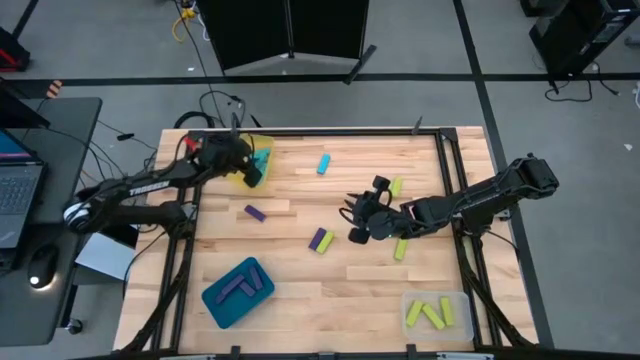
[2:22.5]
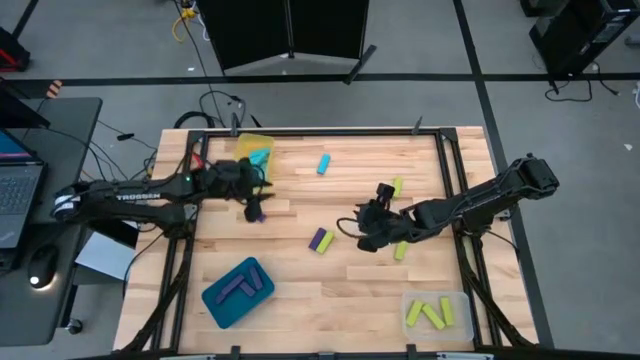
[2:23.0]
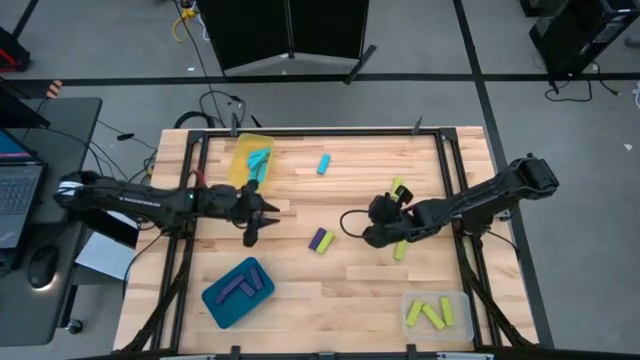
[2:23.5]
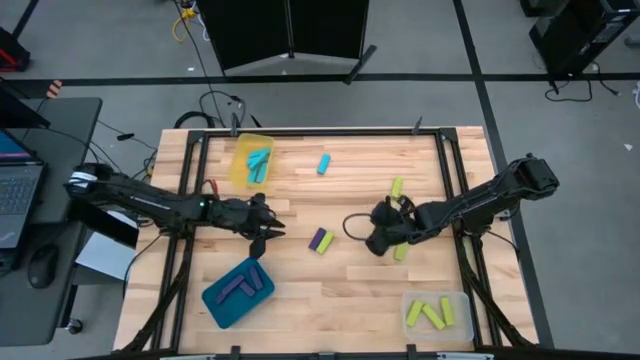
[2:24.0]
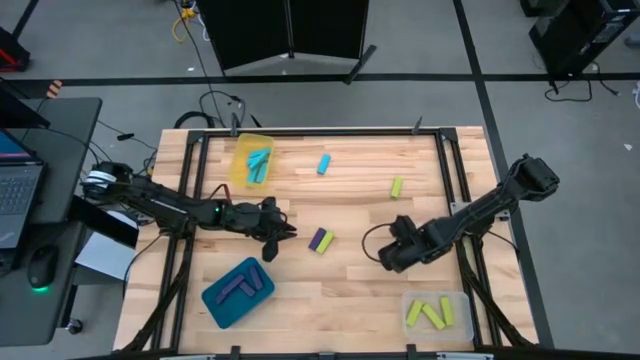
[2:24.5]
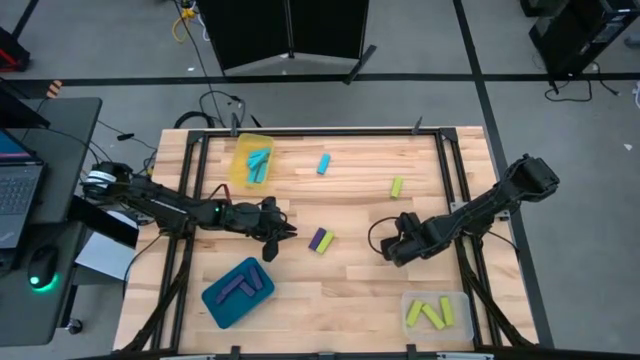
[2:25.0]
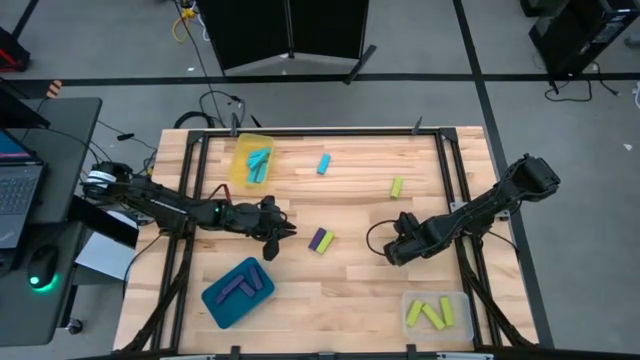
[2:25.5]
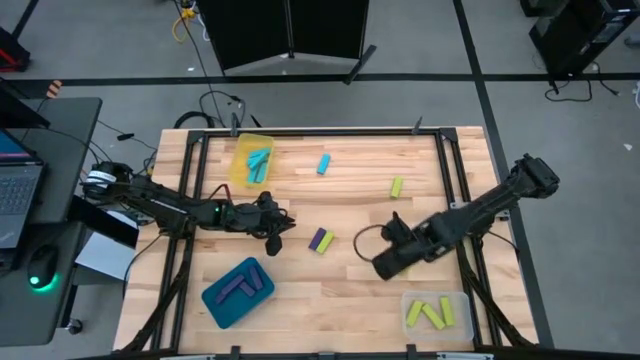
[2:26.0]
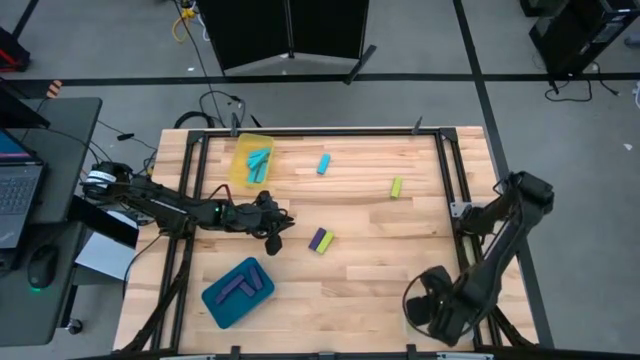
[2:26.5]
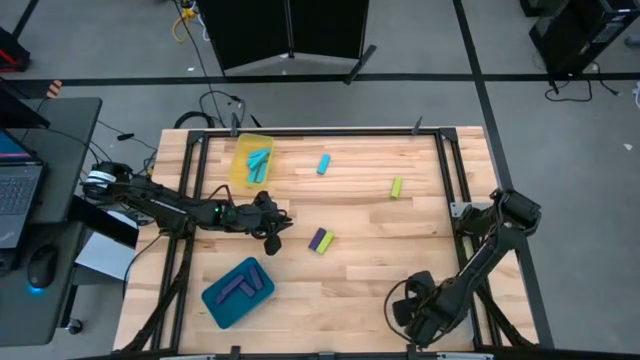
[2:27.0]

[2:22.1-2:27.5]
Task: Sort blocks
Put the bottom right green block into the transparent bin

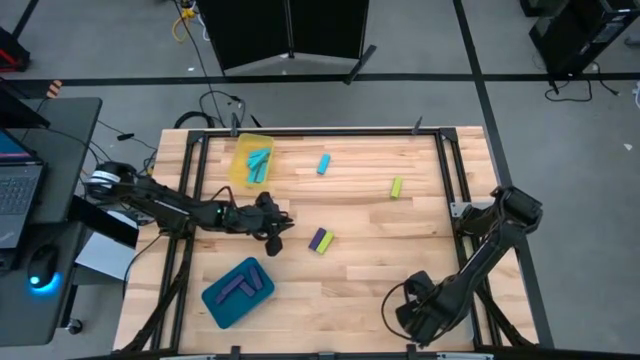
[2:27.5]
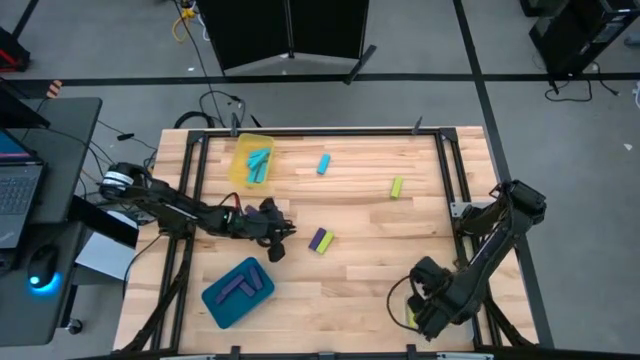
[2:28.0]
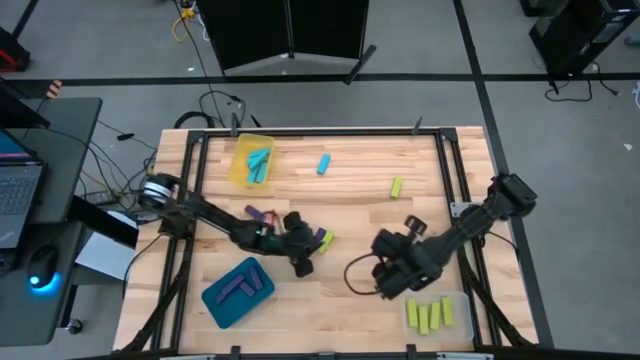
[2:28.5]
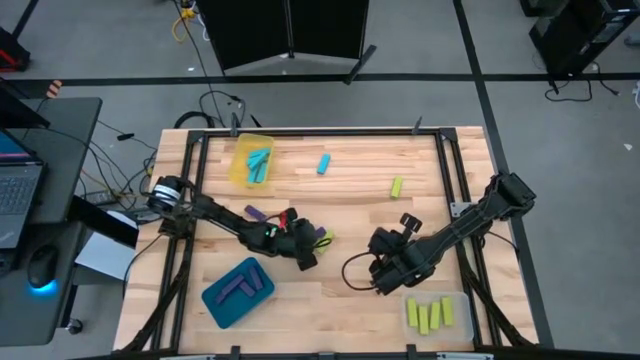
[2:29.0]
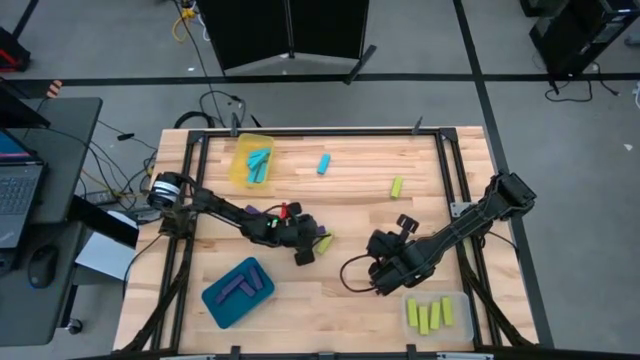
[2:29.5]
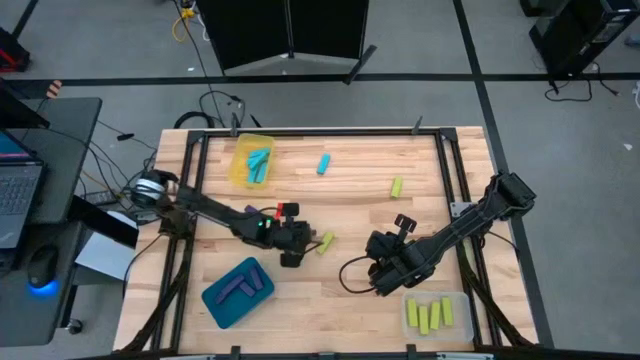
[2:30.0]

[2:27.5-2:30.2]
Put the right purple block into the blue bin

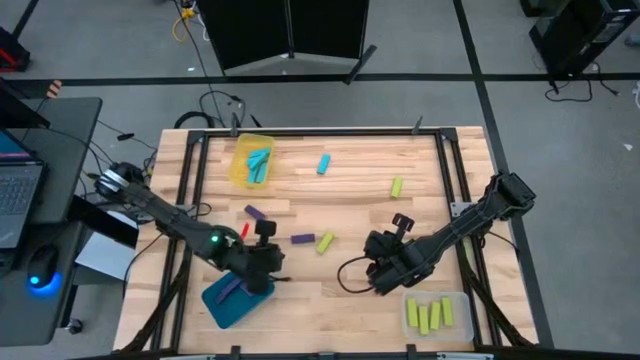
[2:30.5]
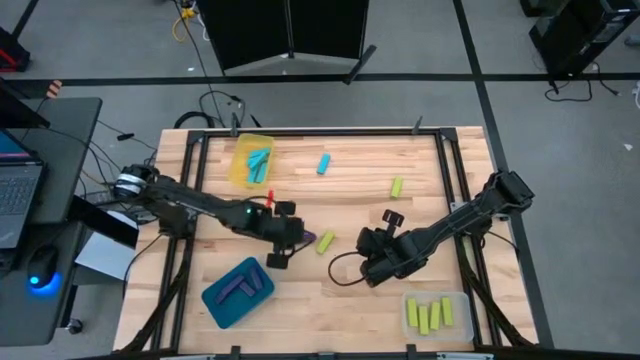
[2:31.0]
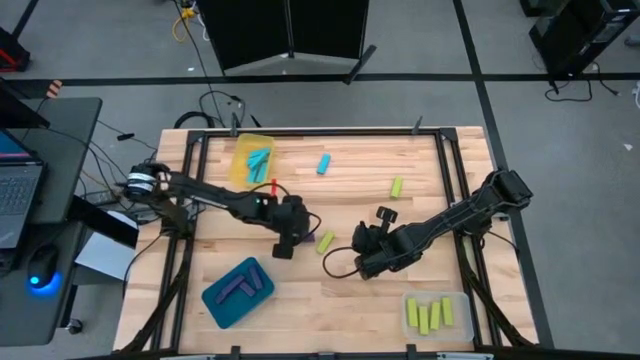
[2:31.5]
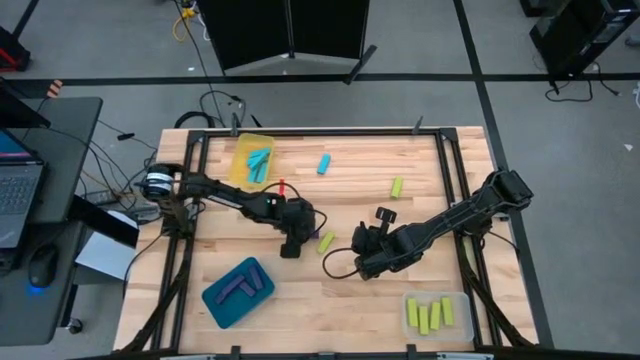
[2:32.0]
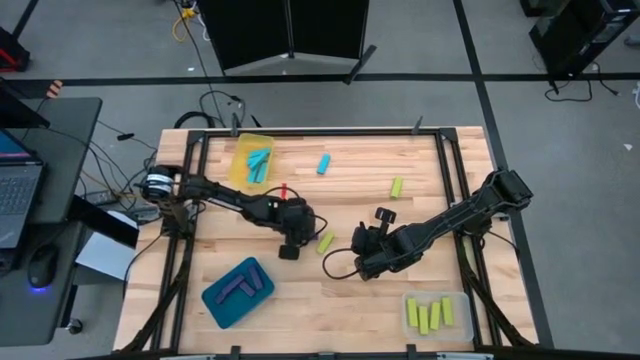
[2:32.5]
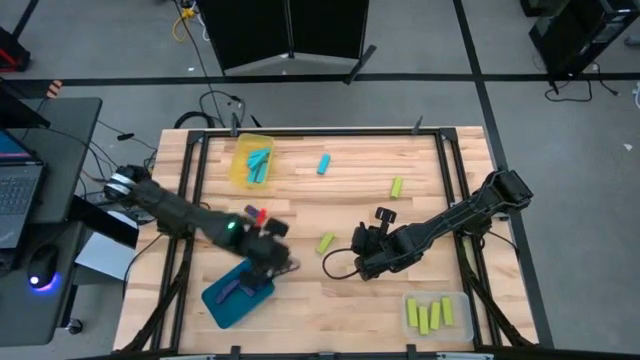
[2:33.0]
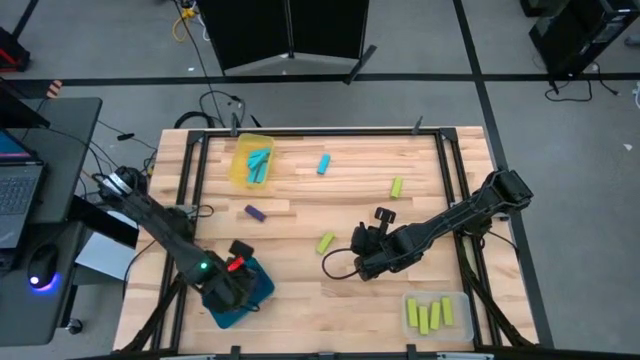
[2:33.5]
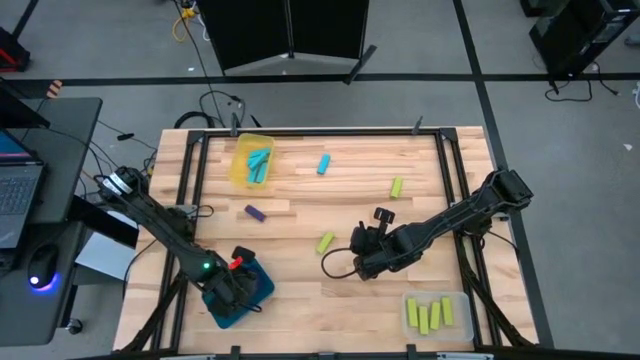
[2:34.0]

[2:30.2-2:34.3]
Put the right purple block into the blue bin

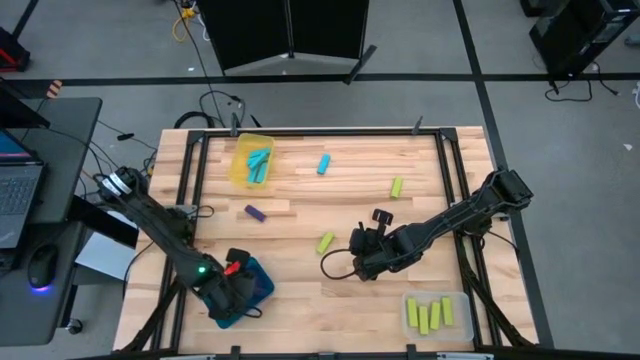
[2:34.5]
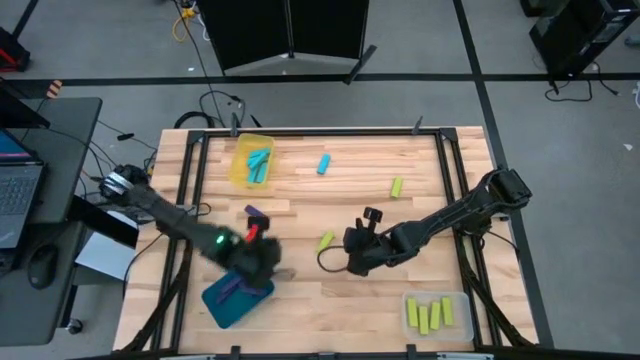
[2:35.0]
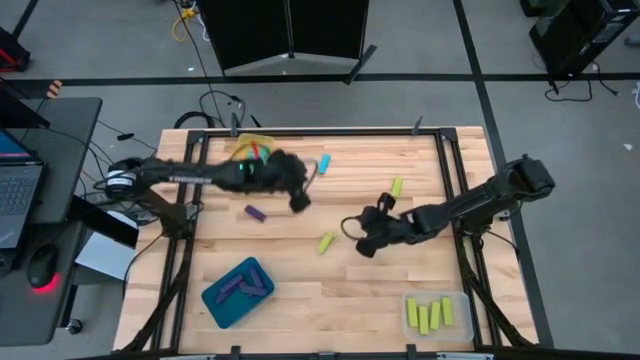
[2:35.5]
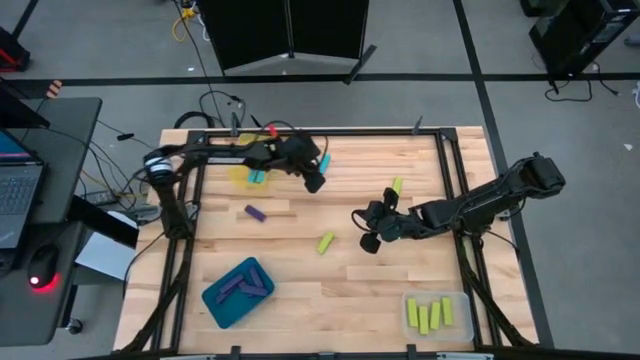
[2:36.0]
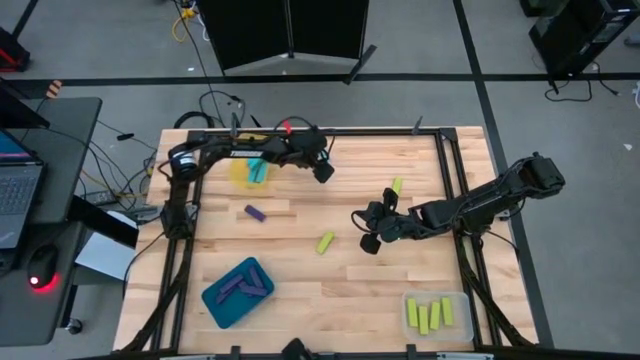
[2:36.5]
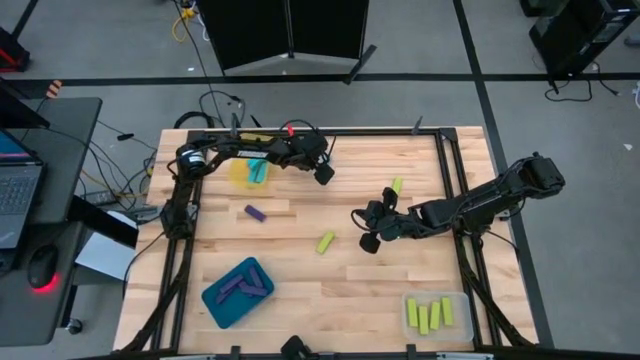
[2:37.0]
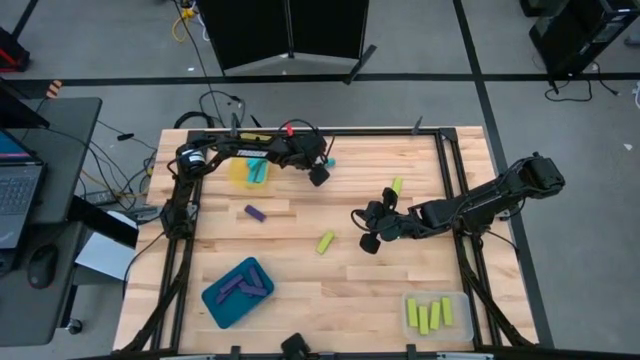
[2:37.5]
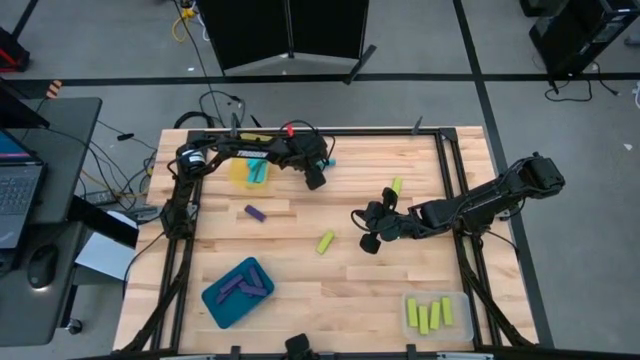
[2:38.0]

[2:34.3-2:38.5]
Put the blue block into the yellow bin

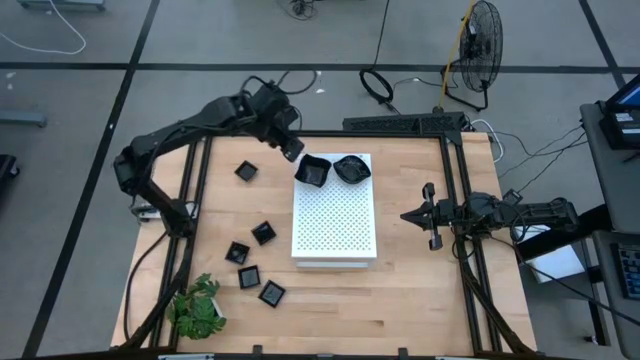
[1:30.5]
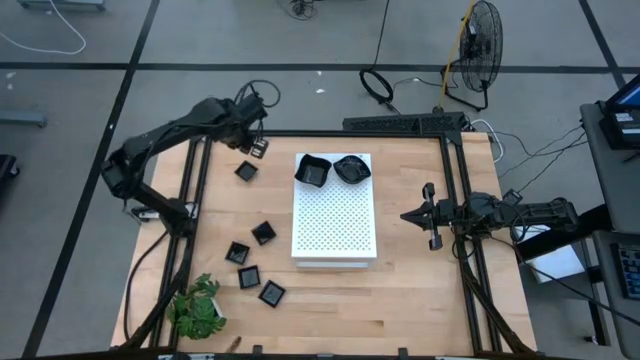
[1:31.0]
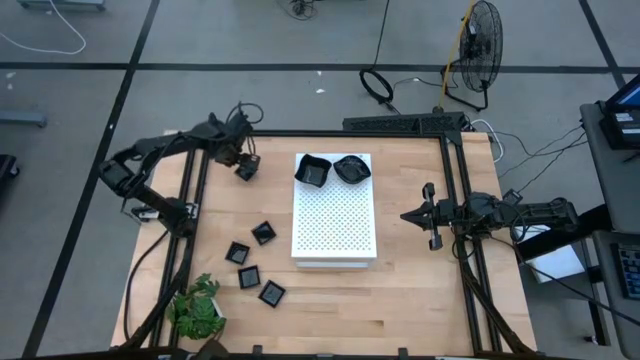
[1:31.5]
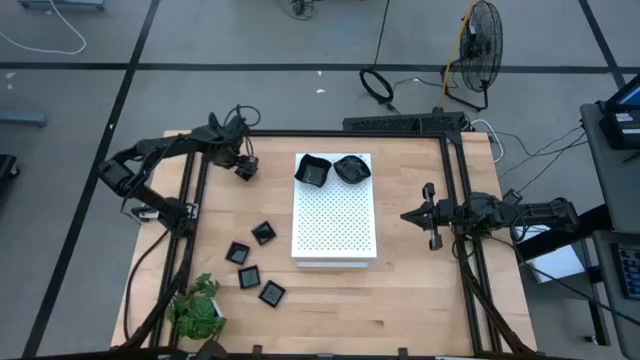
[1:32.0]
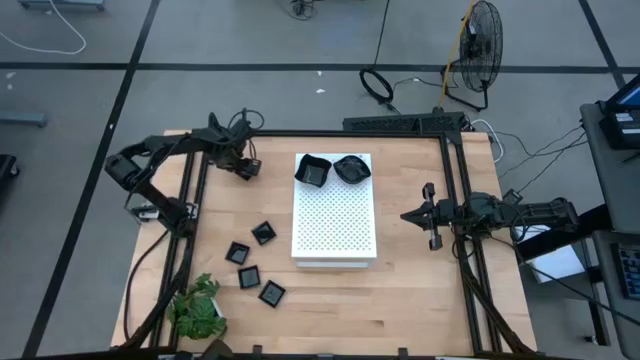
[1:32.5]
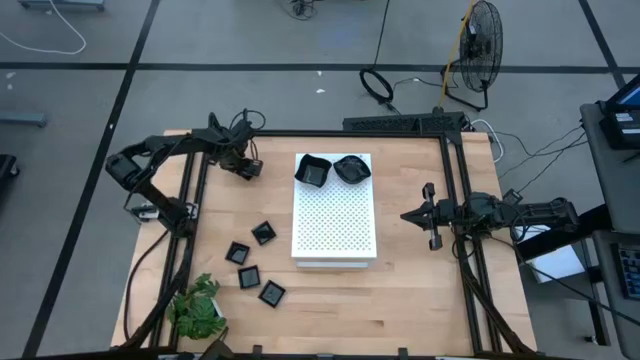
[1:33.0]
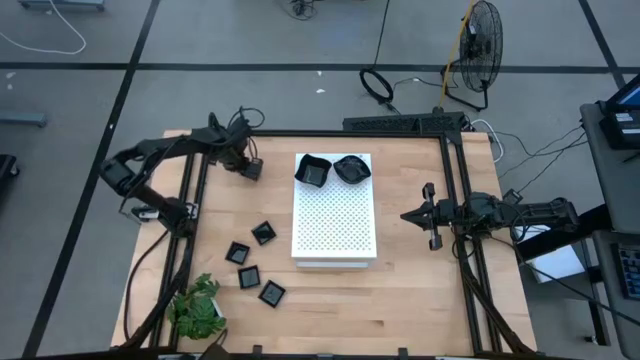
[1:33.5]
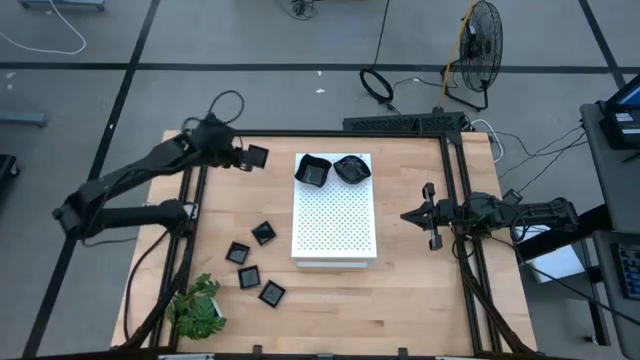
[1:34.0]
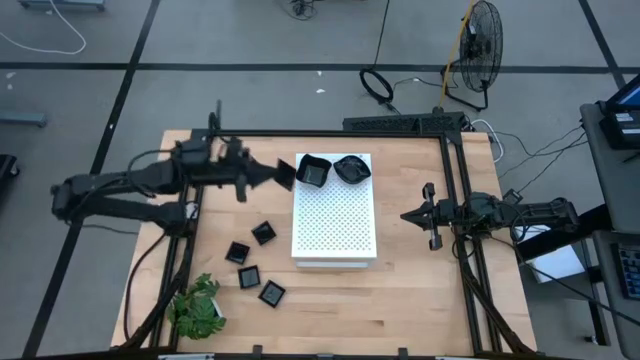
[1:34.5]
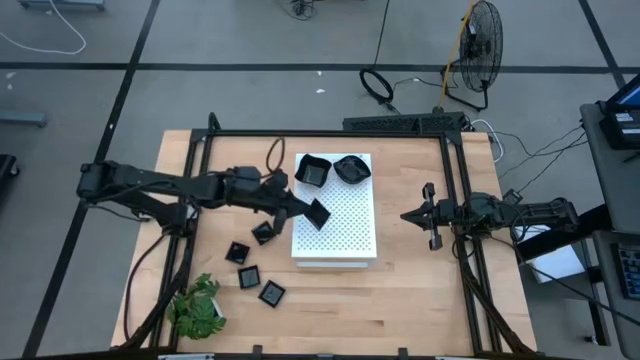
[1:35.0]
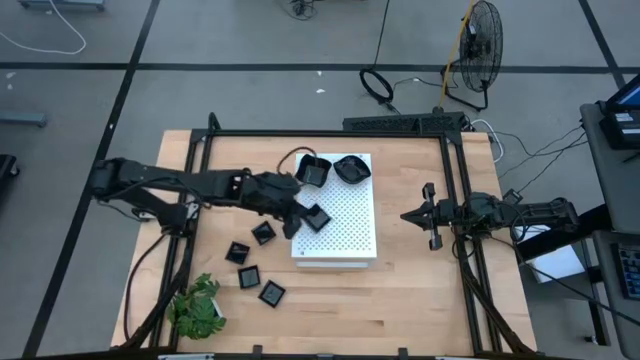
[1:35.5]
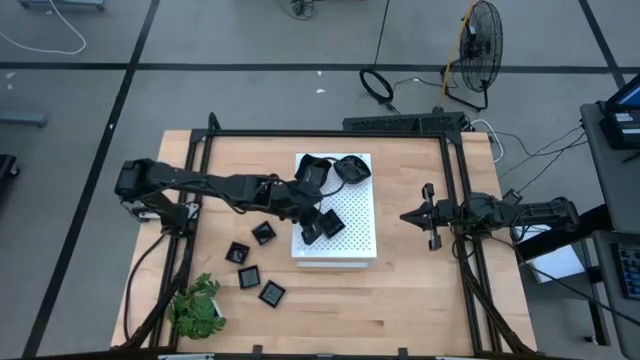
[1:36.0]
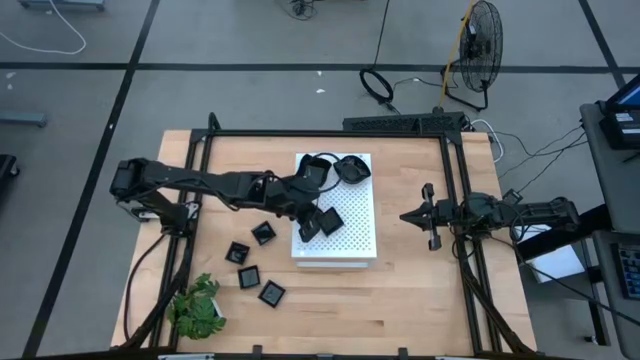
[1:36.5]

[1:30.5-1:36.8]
Task: Pick & Place Mini shaped plates
Put the black square plate on the shelf
